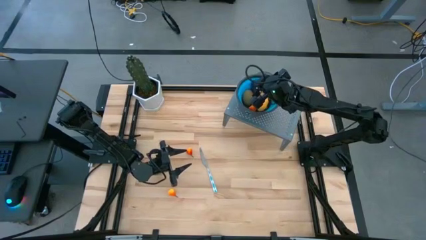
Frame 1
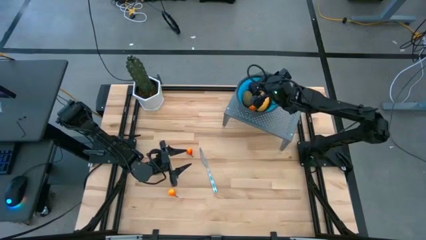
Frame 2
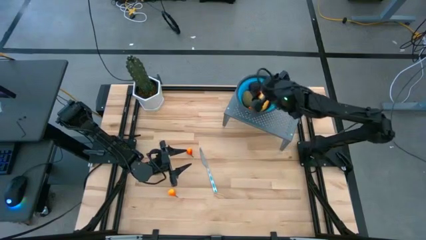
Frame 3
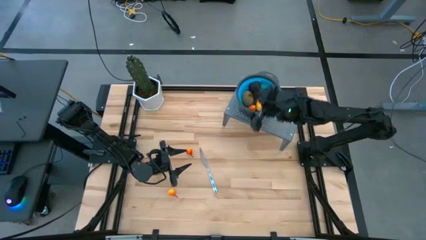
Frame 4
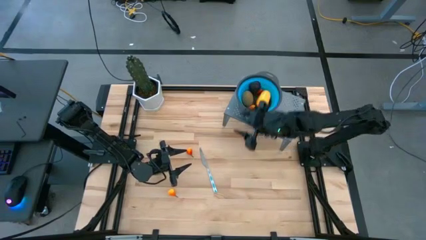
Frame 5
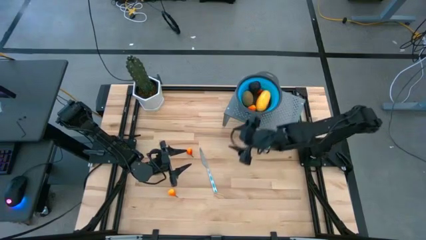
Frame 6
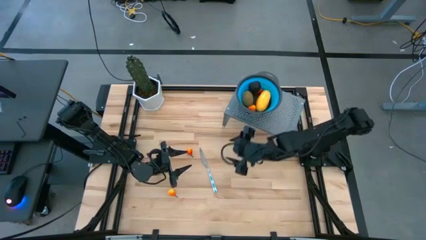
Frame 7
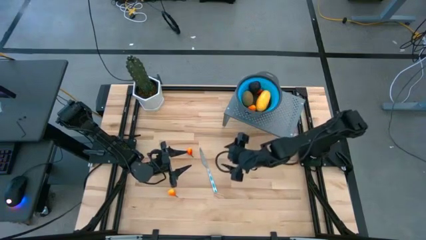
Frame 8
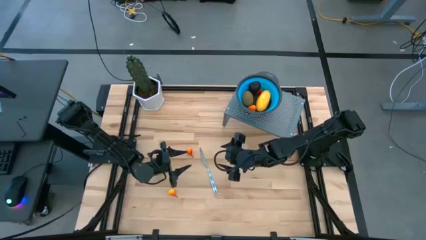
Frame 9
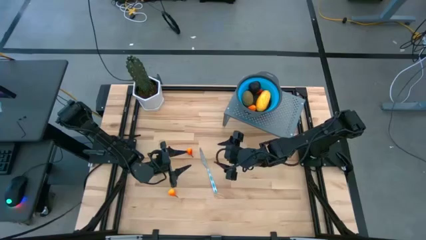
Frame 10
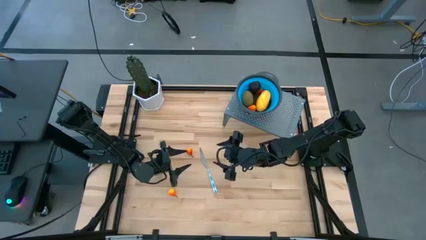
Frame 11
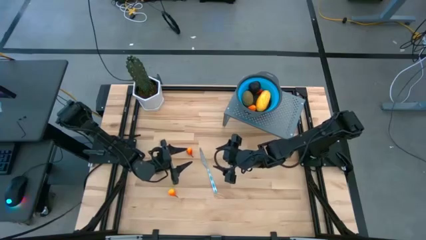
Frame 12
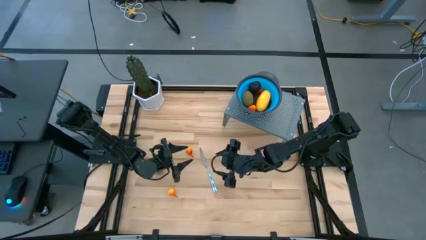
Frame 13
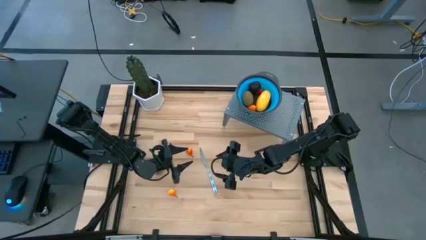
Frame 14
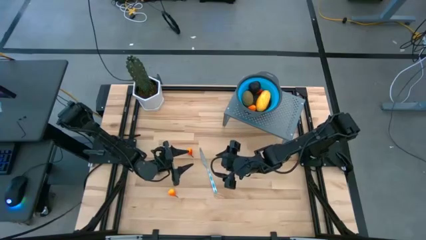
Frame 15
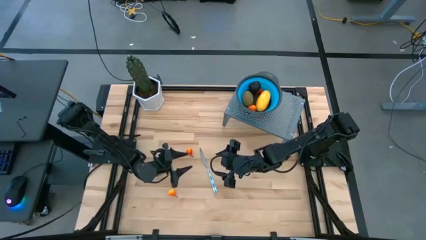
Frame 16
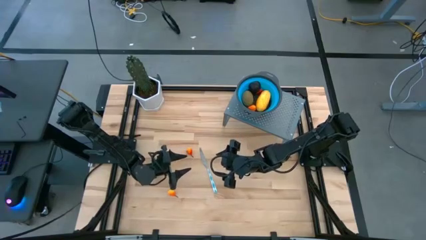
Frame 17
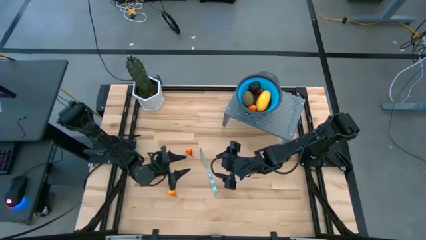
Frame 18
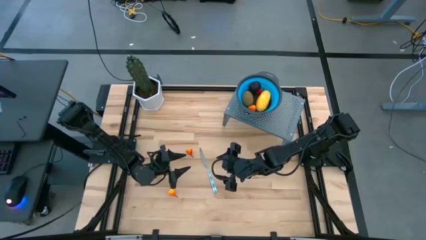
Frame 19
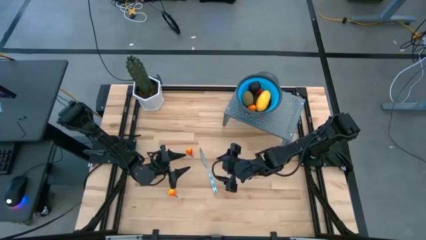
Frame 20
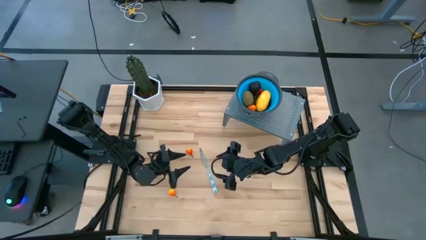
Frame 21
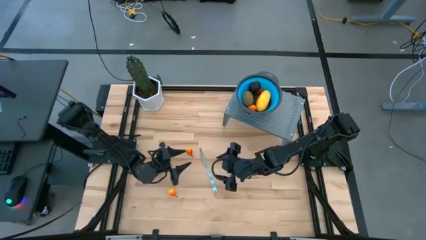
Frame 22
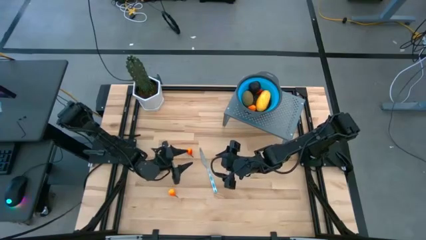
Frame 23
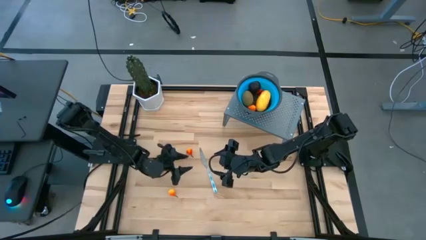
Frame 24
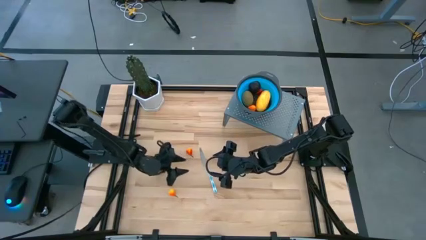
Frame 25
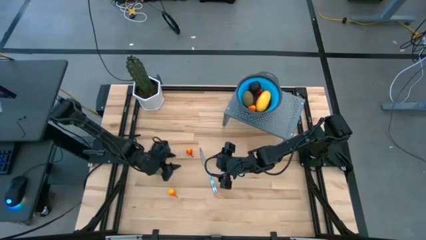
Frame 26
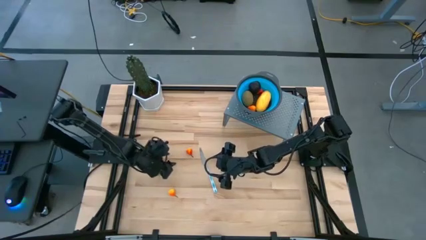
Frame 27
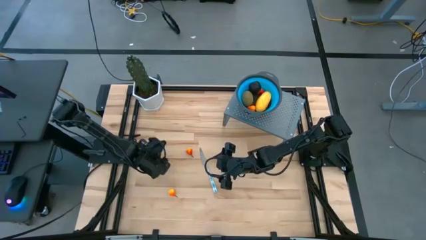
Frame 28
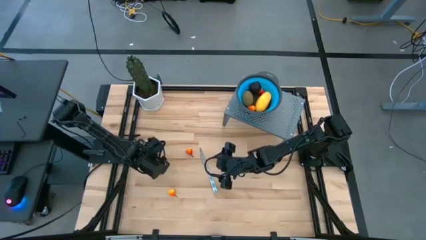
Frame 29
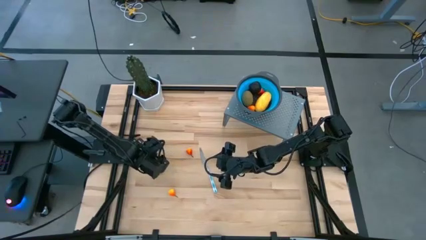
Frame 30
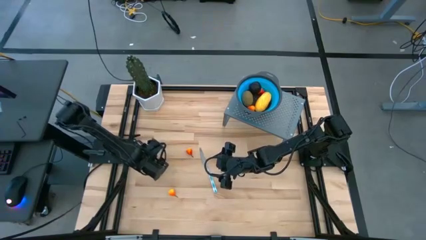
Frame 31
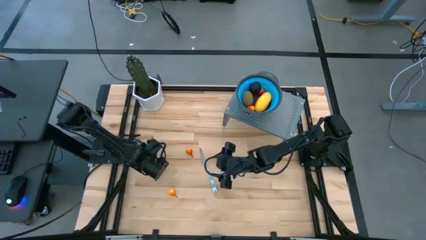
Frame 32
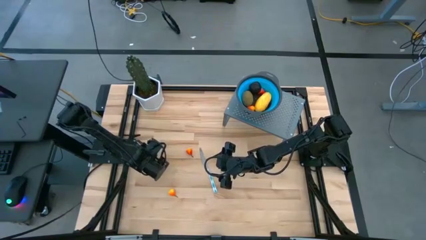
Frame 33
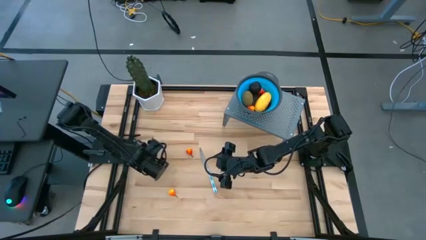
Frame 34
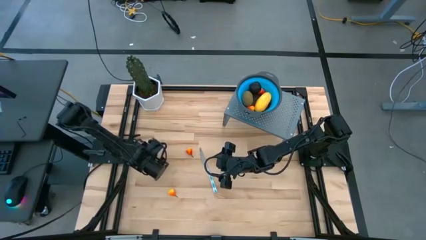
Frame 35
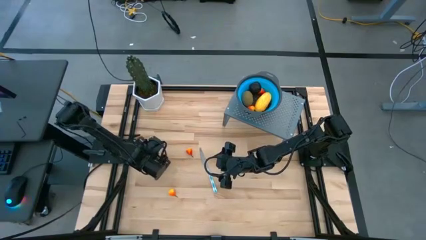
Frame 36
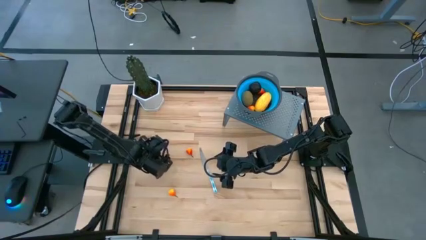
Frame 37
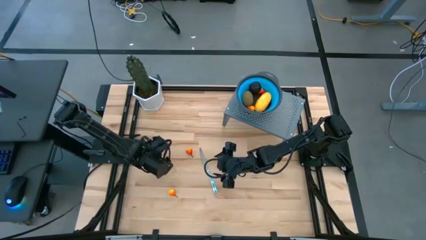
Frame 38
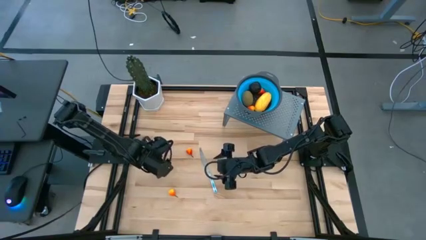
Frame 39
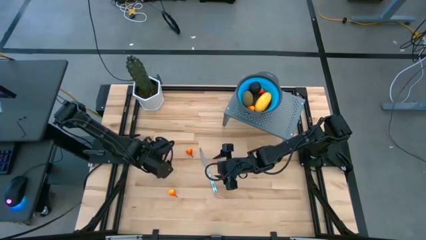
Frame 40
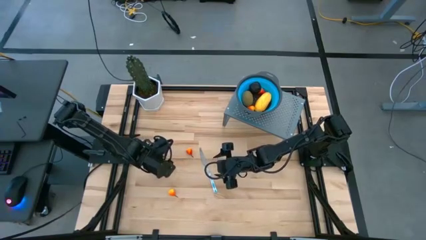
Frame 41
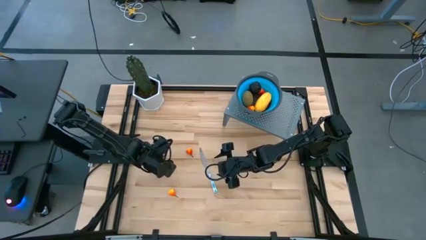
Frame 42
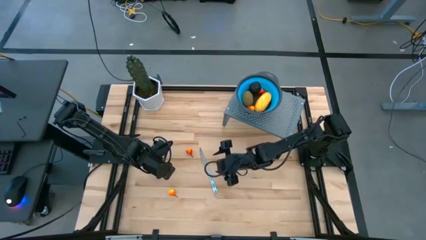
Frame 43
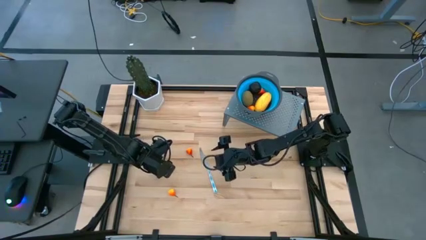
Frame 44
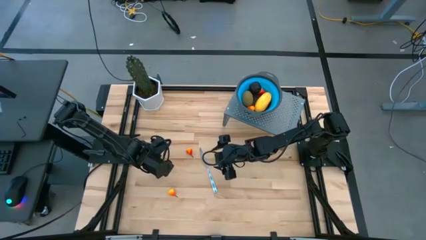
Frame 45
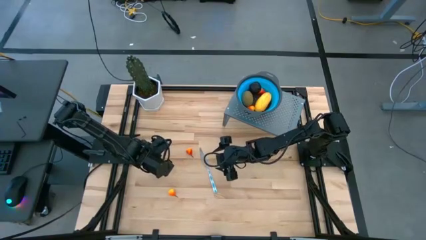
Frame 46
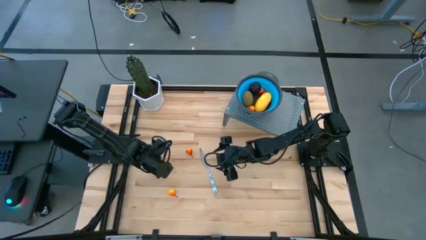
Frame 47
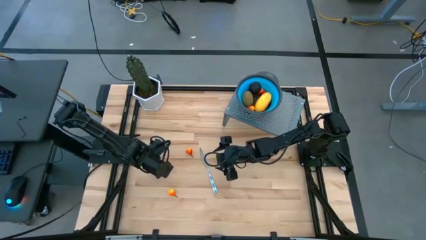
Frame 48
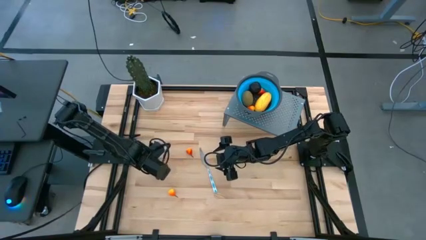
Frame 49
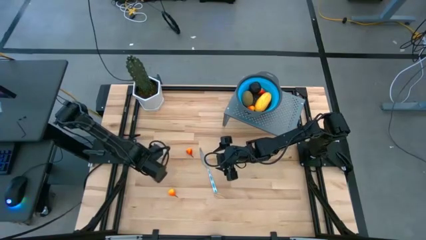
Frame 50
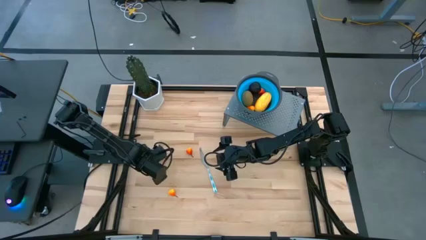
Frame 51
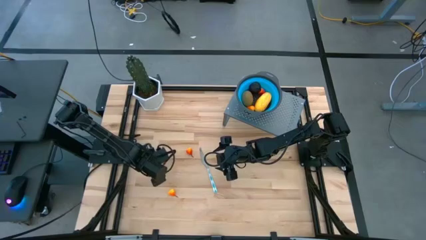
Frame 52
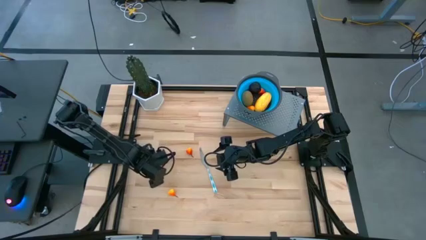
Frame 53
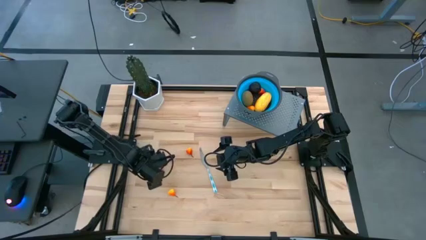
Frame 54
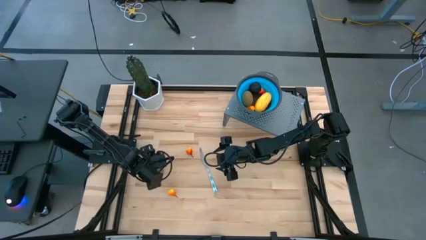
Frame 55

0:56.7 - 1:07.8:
Task: Pick & Place Fruit
Put the brown kiwi in the blue strainer bowl on the shelf

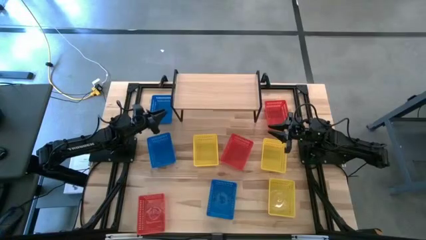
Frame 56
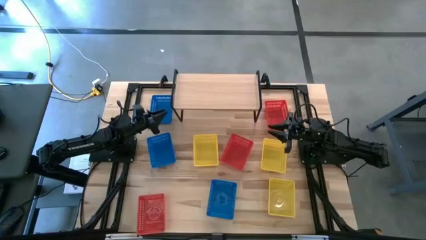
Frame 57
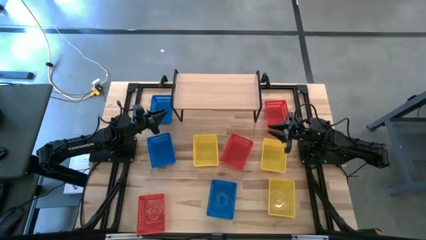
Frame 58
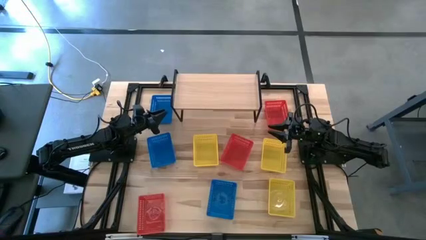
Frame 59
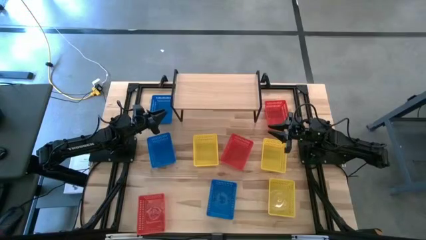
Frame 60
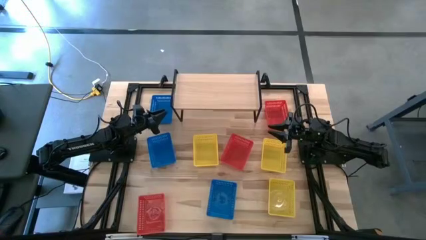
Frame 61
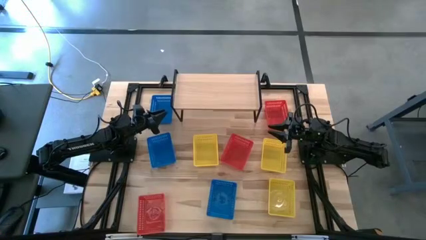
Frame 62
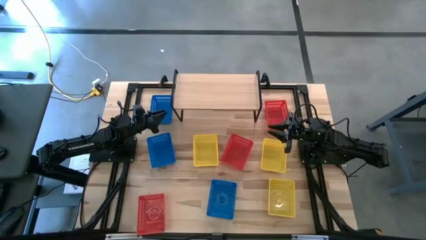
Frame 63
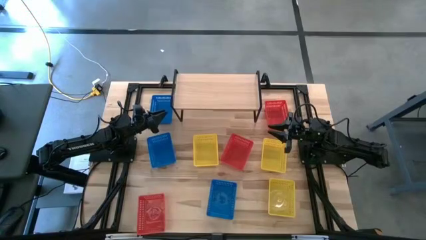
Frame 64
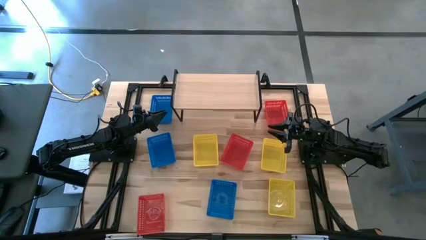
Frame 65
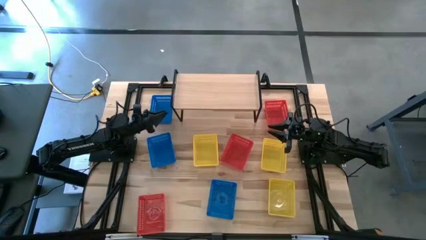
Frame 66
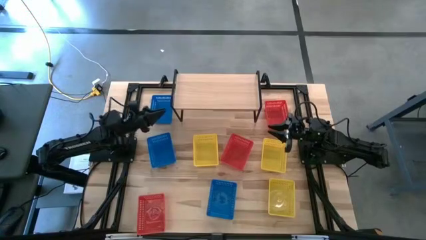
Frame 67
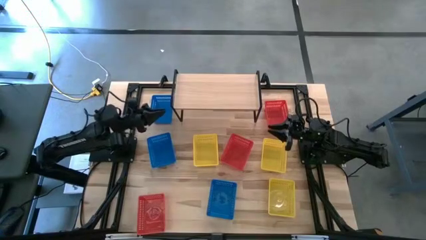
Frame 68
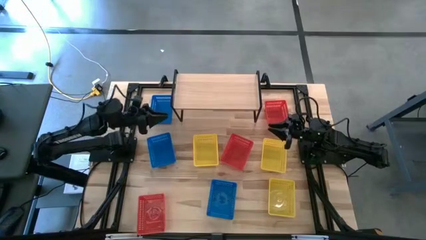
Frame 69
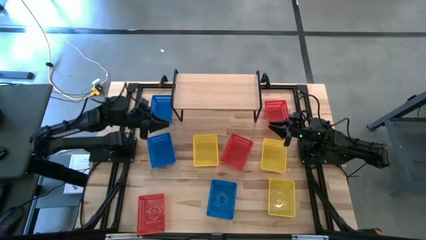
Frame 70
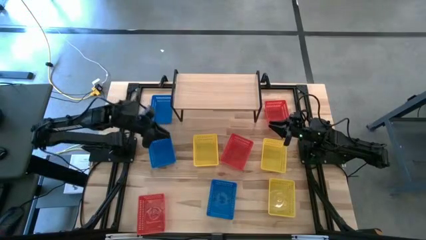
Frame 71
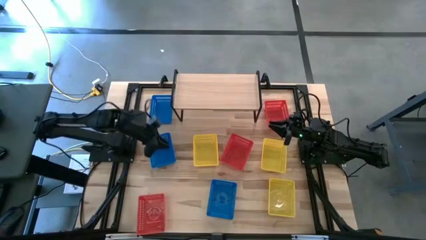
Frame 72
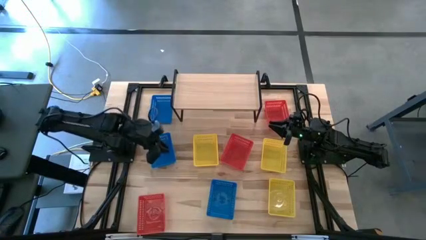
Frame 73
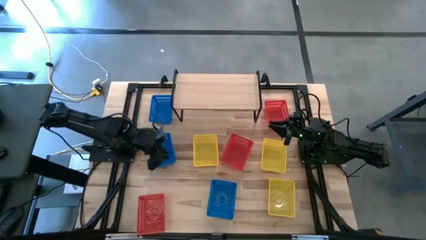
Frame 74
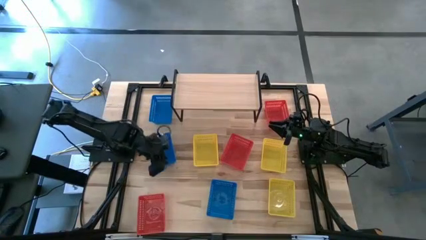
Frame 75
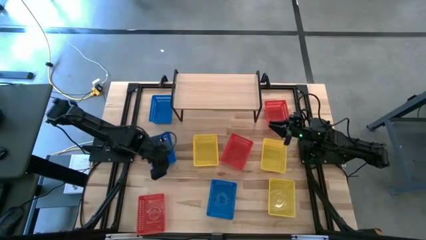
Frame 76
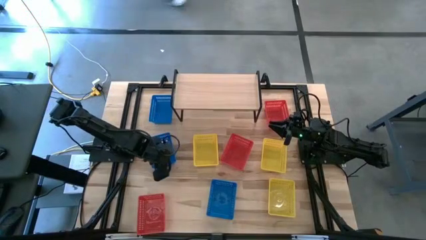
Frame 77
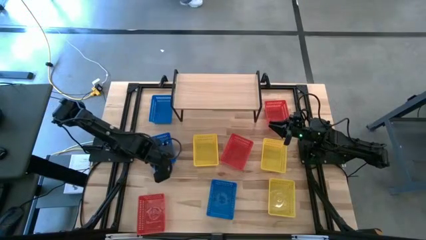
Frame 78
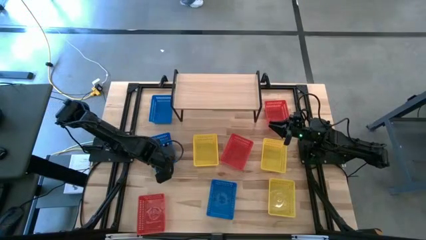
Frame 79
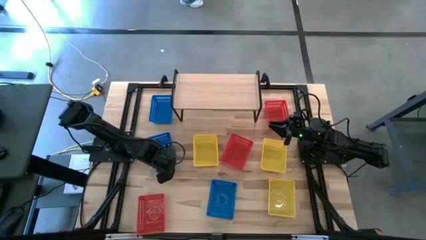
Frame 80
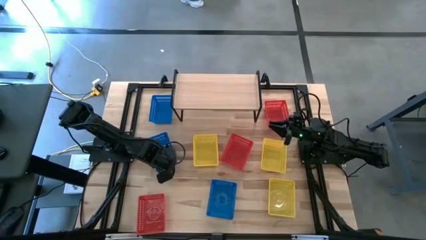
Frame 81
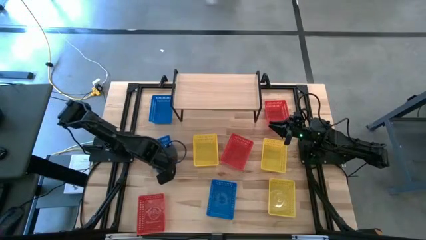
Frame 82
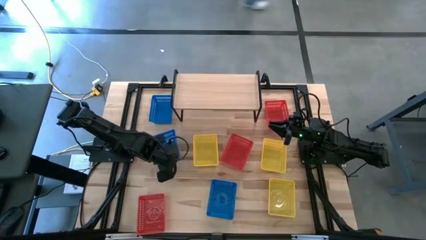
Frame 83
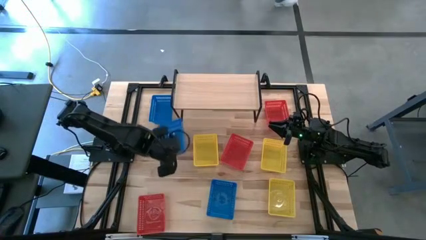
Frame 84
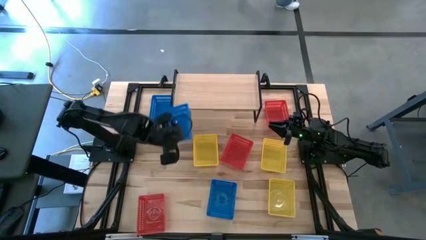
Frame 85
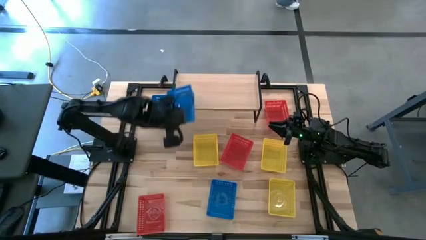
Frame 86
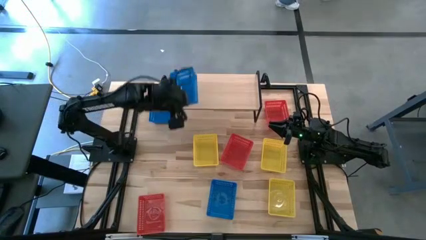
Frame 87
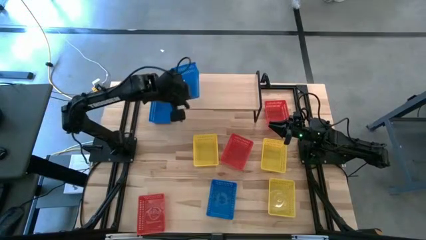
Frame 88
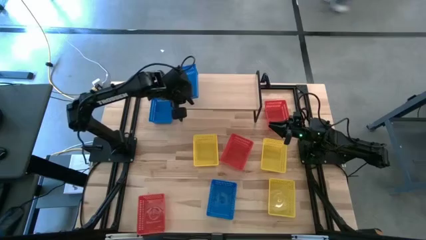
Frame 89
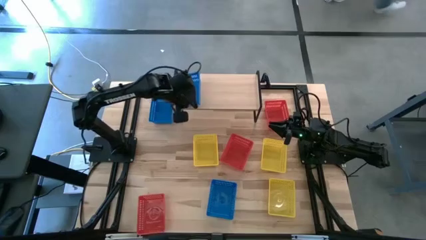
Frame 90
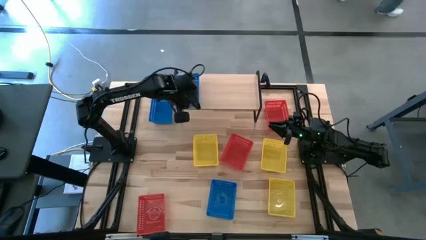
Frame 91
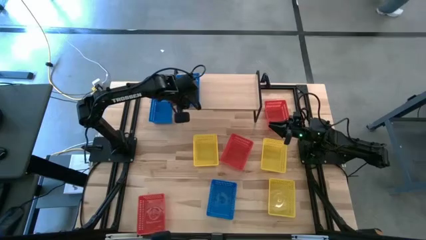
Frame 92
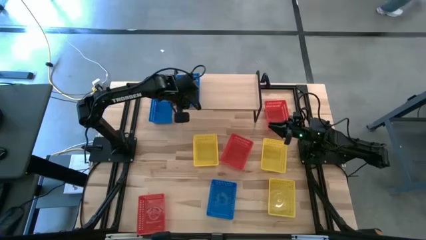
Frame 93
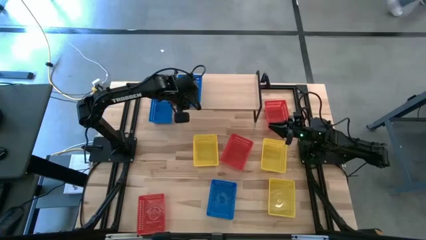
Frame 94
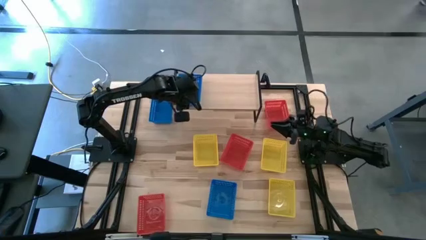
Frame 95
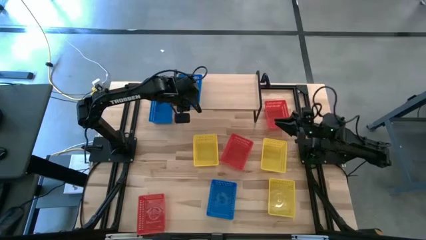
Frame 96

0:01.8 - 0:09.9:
Task: Stack baskets on shelf by color
Put the center blue bin on the shelf
